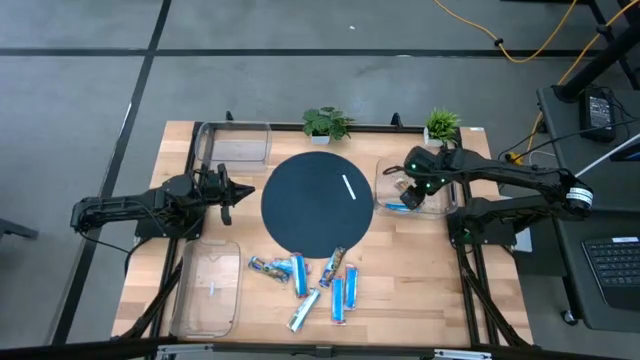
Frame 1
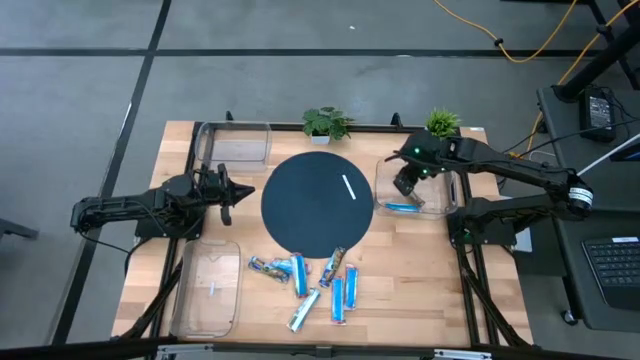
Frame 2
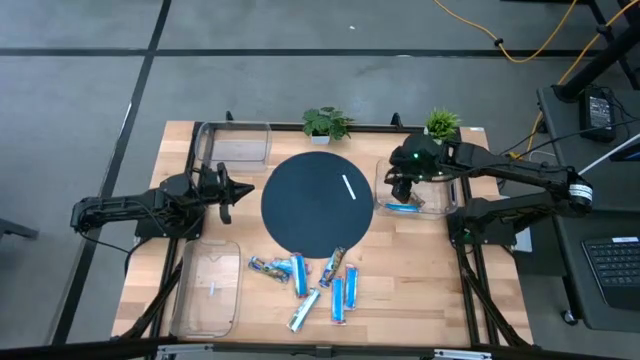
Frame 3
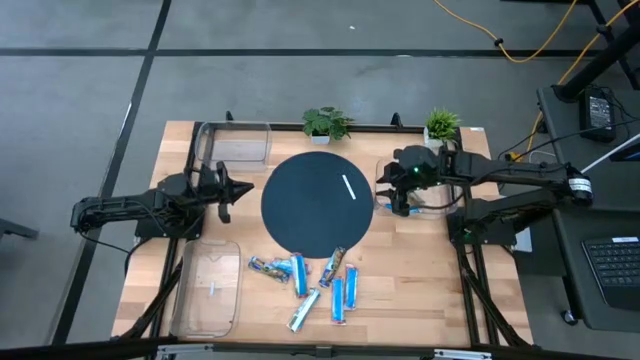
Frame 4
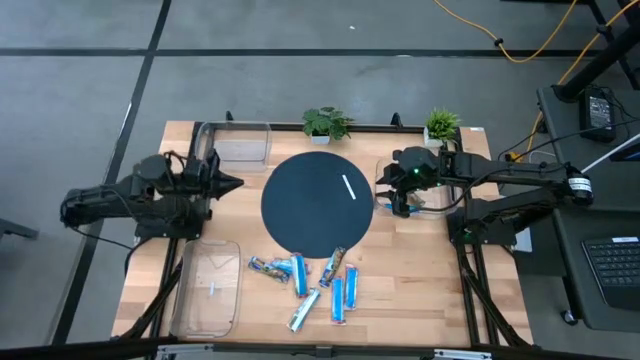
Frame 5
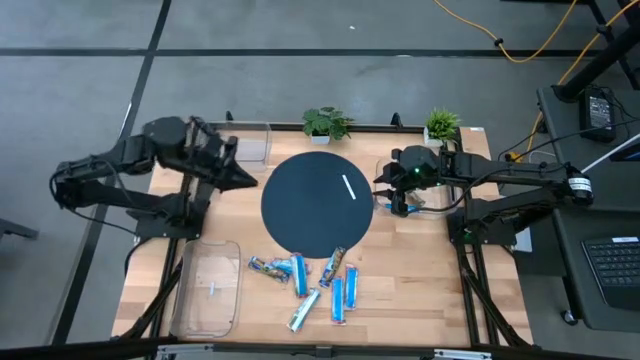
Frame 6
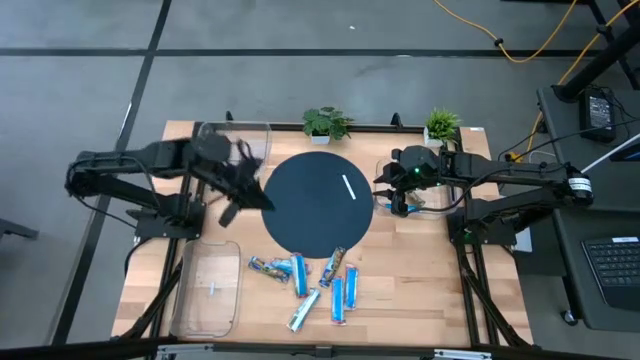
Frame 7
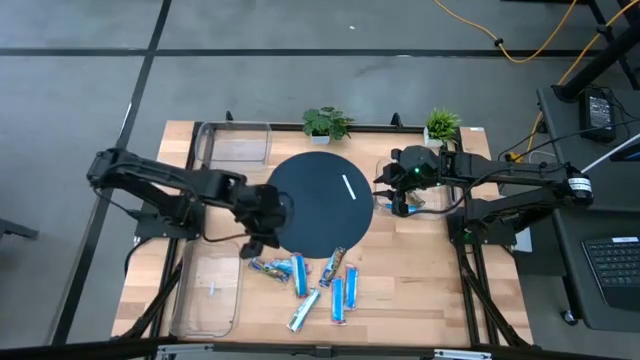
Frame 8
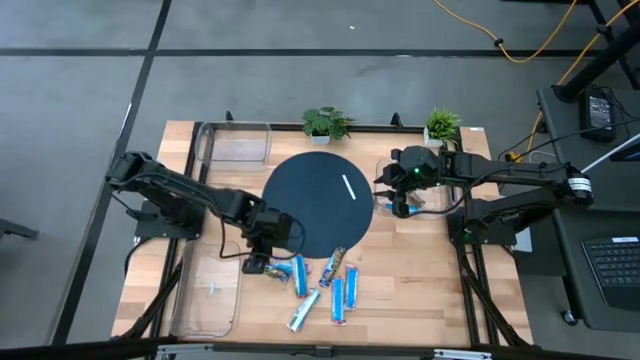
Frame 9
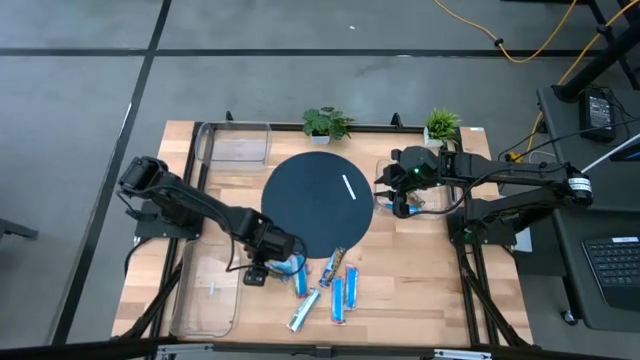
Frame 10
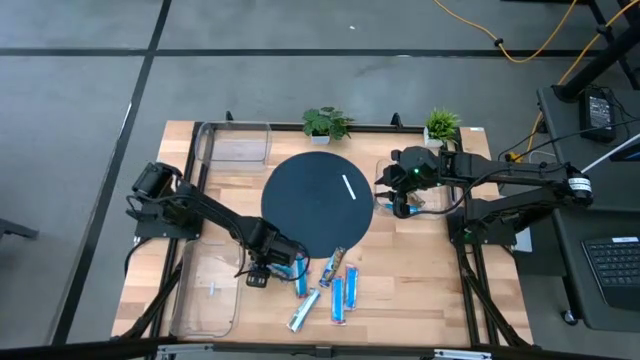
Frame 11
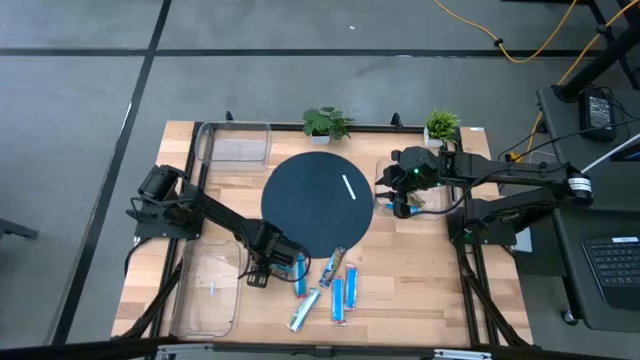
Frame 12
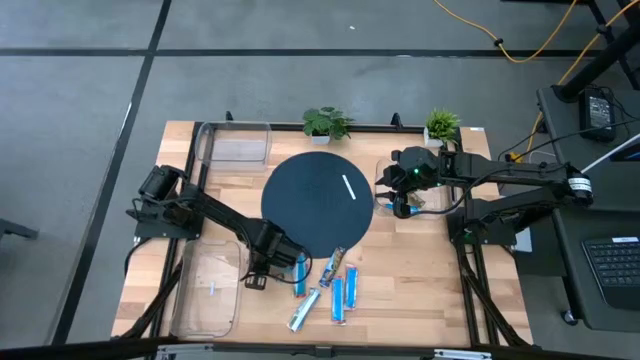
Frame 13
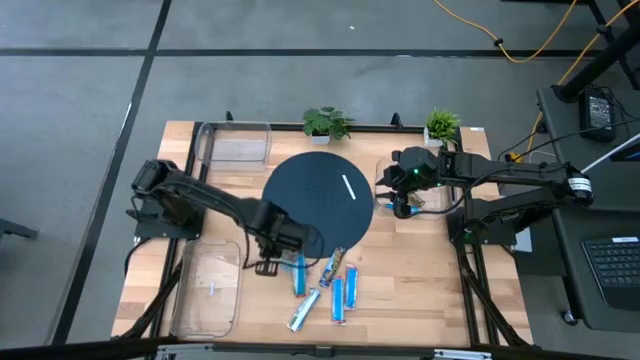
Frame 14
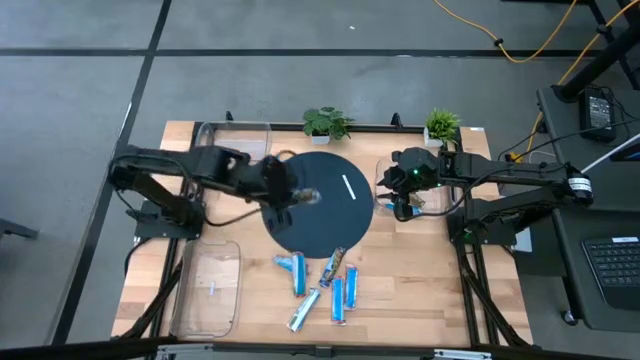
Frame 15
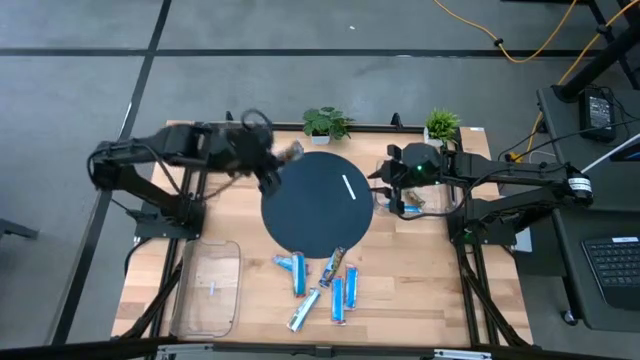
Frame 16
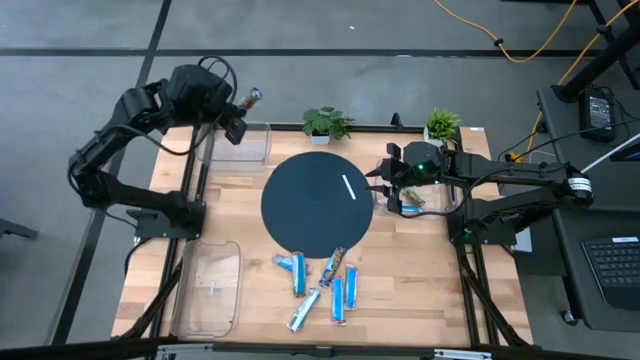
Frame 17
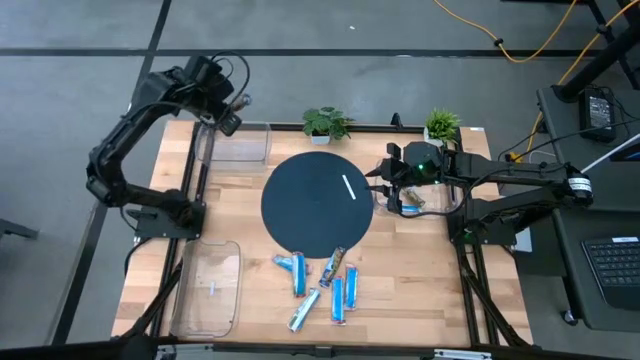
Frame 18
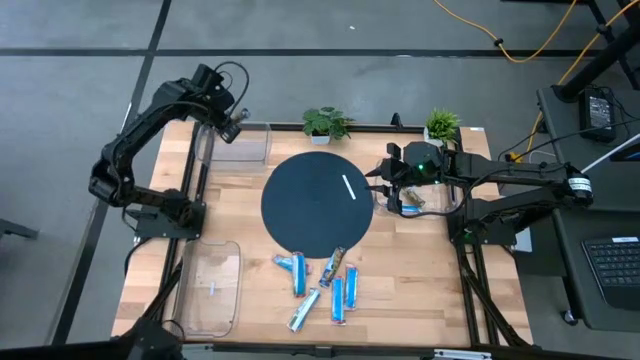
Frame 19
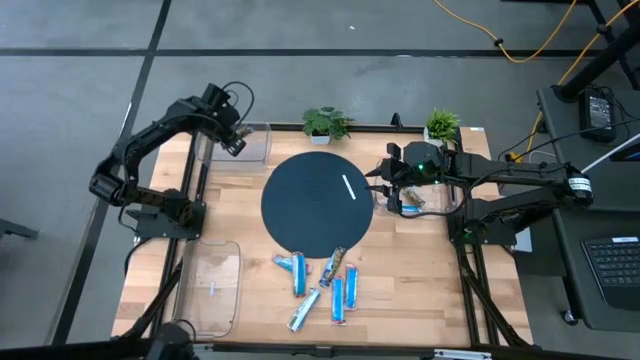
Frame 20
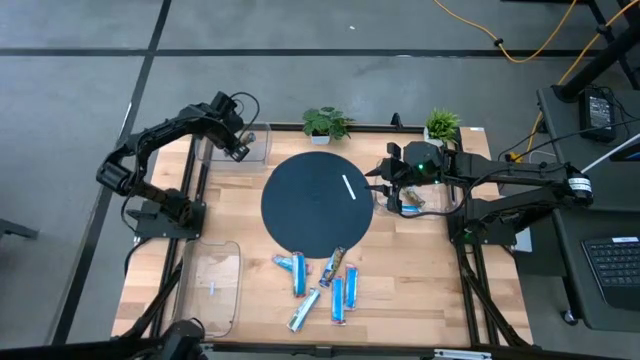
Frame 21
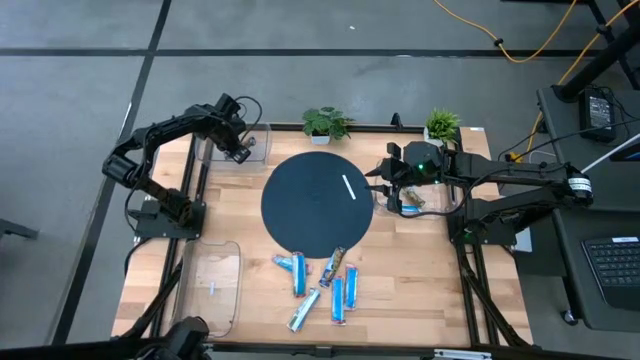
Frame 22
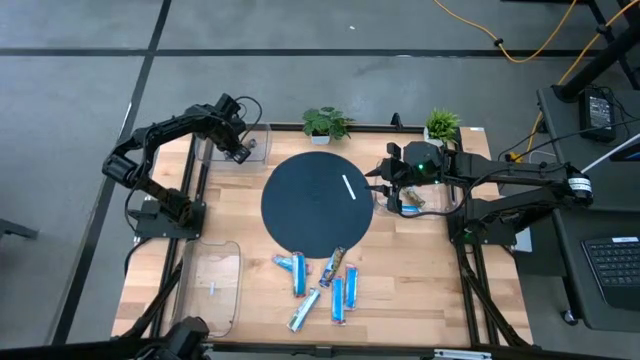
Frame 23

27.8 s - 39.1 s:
Task: Pick and place Granola Bars by type
Put the blue granola bar into the top left transparent bin

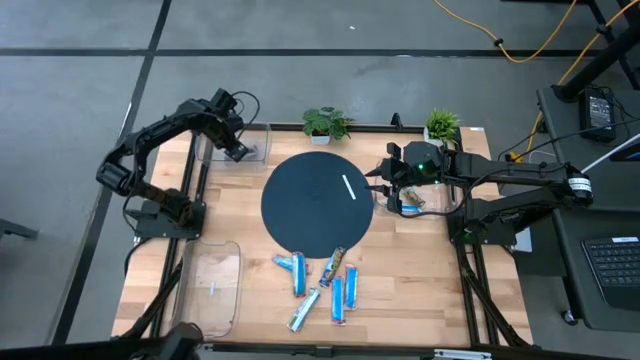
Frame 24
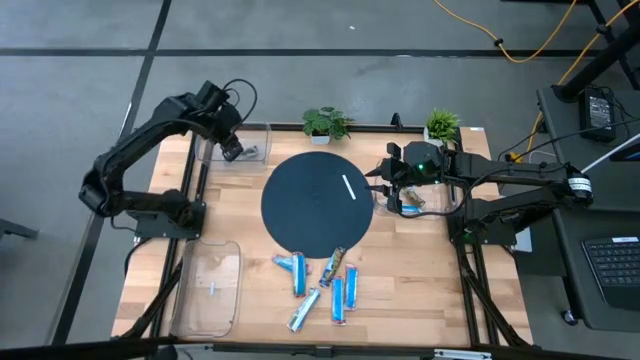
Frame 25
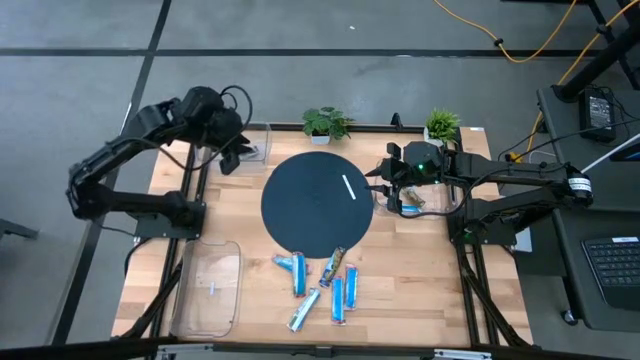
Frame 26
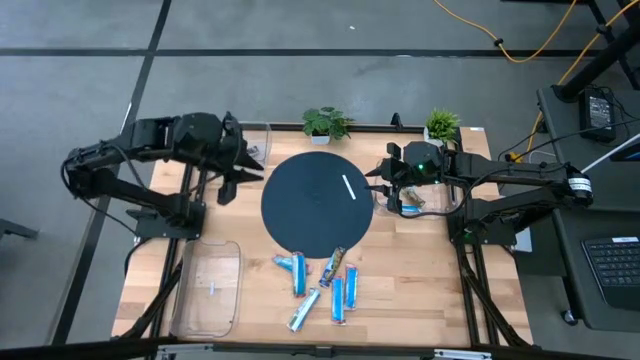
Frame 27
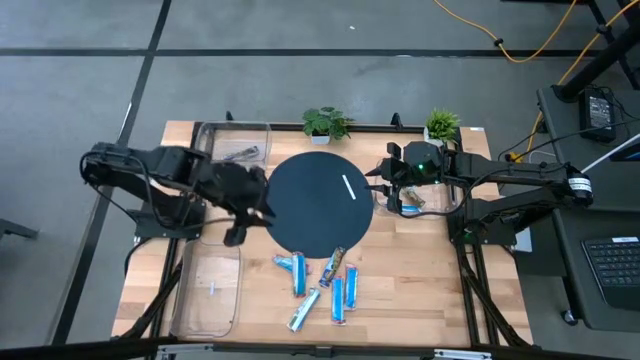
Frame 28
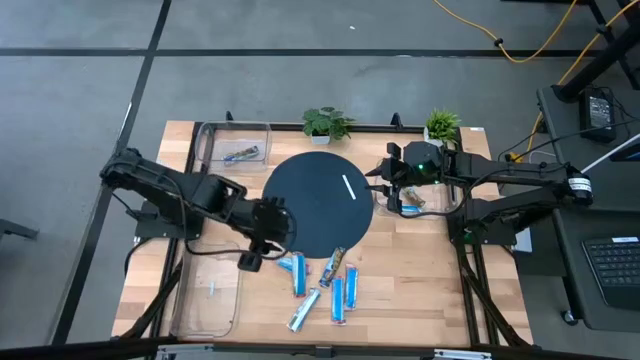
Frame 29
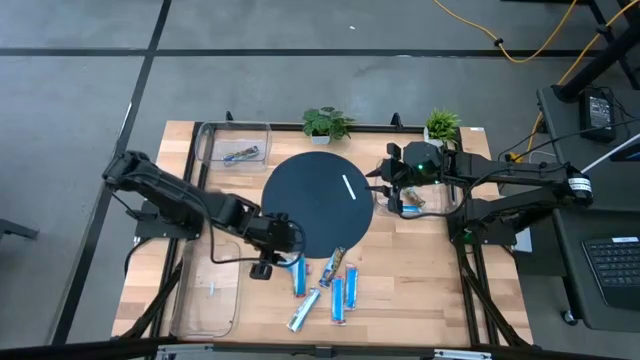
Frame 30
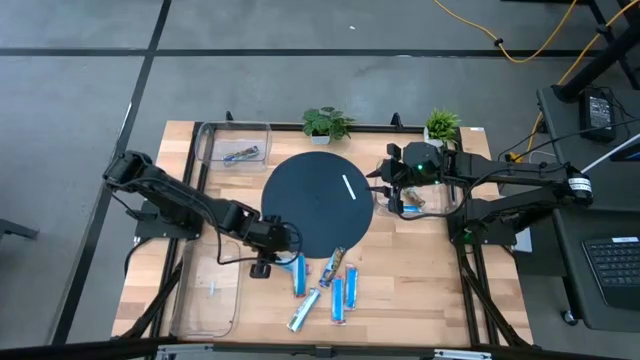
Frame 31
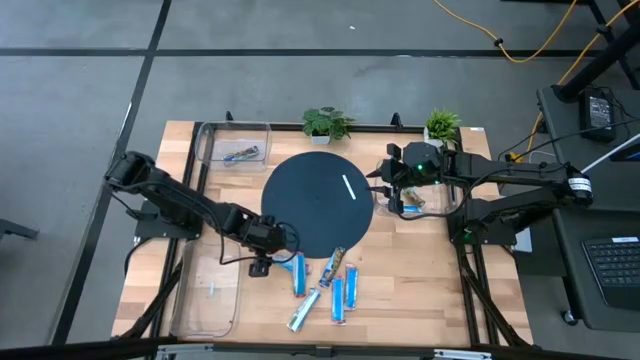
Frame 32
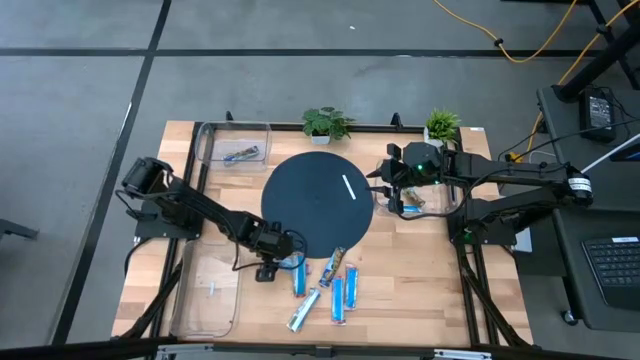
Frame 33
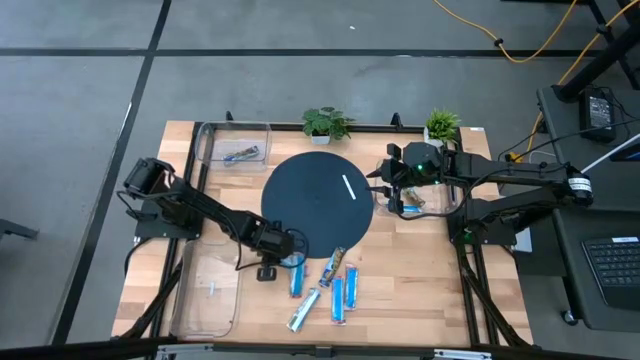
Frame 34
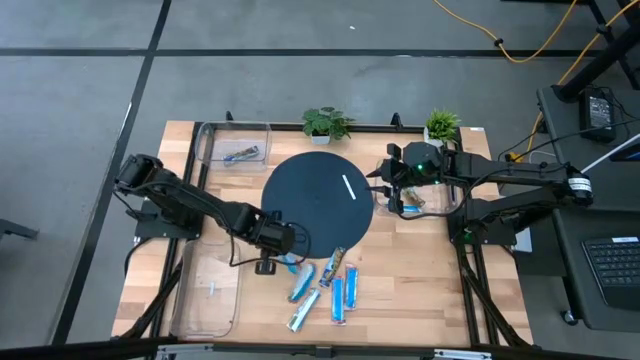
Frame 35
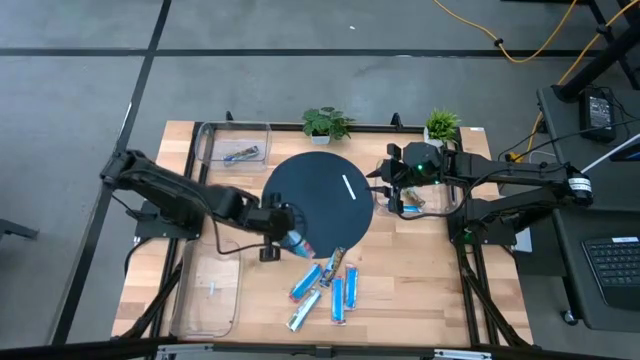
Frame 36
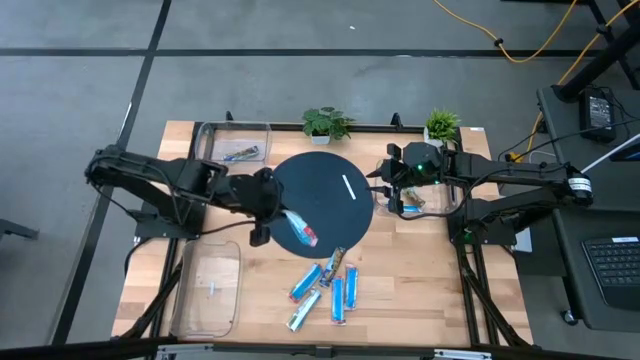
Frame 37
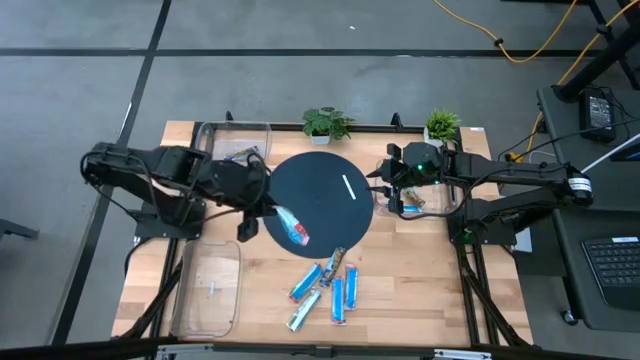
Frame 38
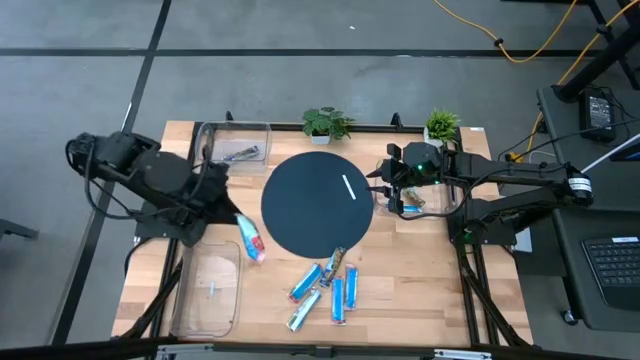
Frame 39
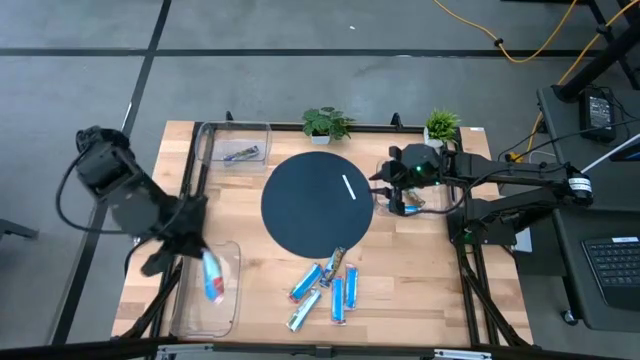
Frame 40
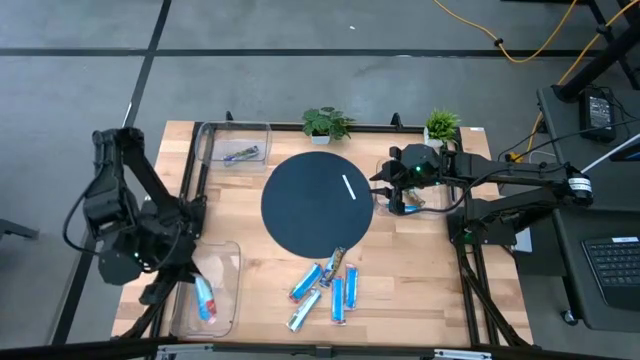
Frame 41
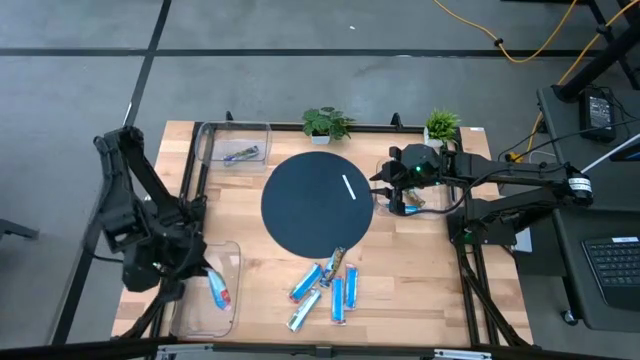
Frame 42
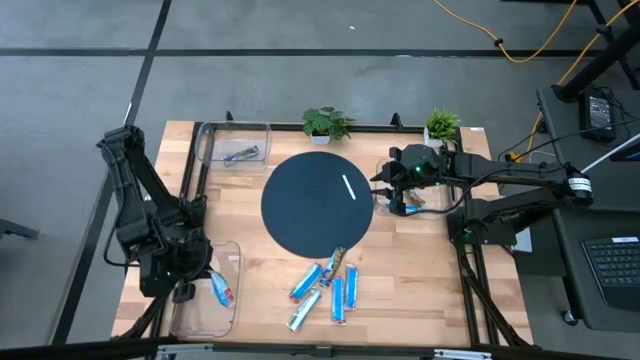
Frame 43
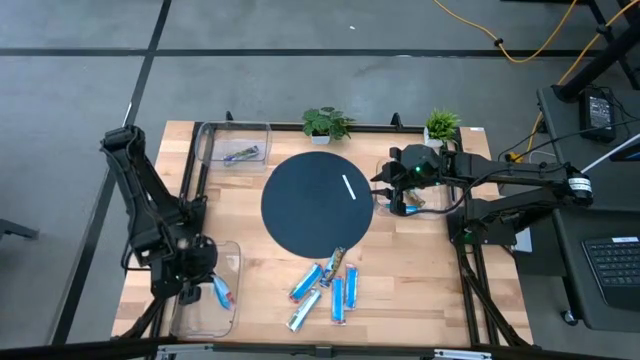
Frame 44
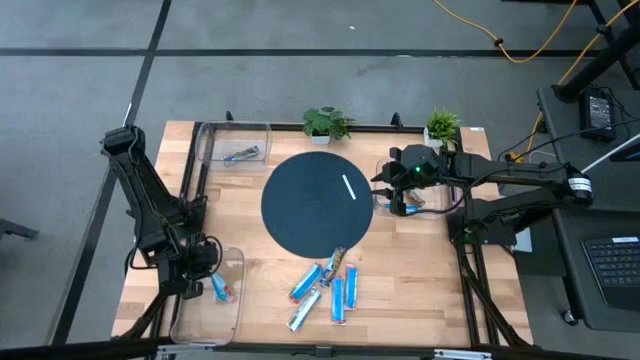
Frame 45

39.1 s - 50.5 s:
Put the red granola bar into the bottom transparent bin
